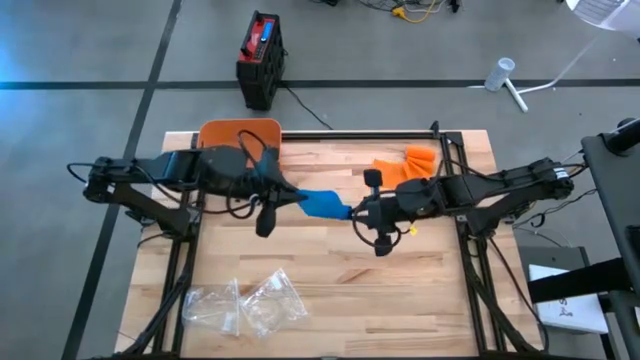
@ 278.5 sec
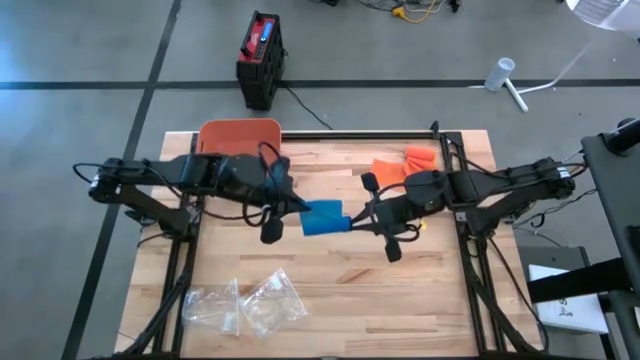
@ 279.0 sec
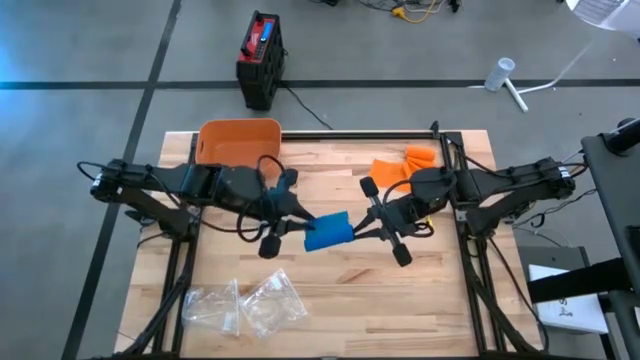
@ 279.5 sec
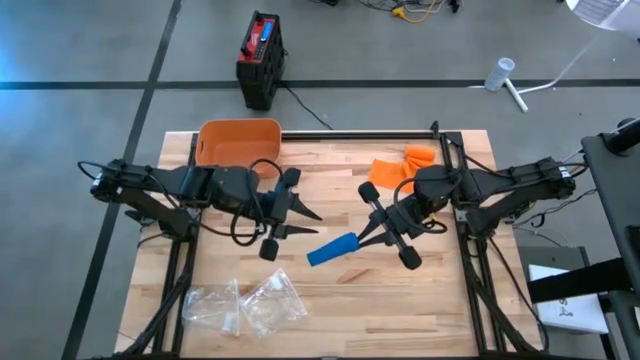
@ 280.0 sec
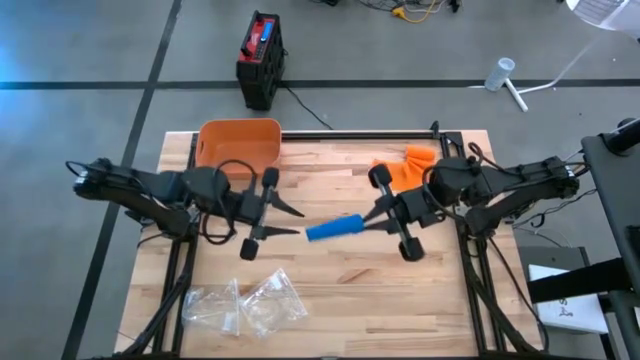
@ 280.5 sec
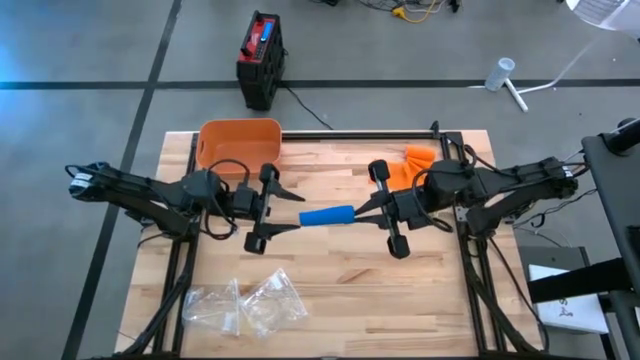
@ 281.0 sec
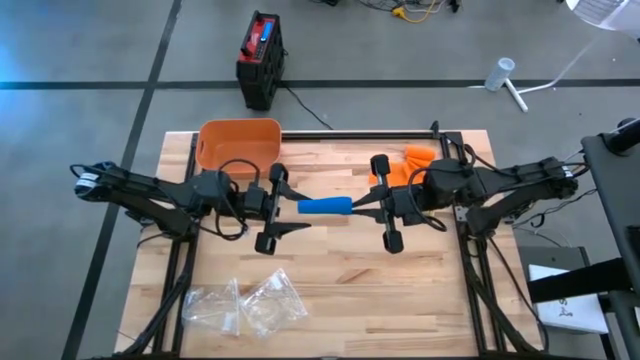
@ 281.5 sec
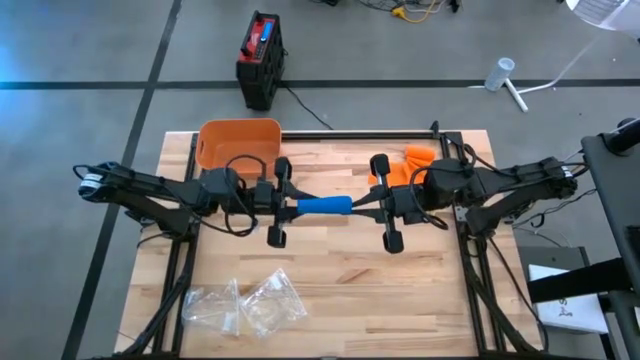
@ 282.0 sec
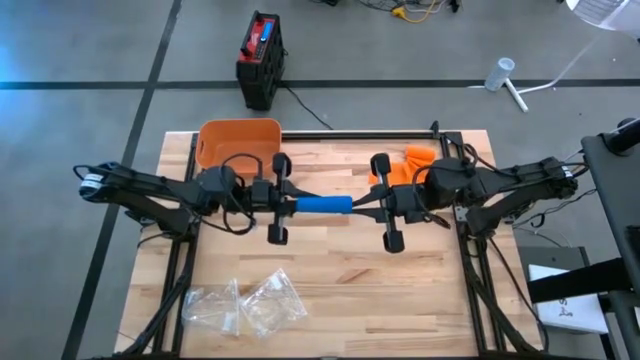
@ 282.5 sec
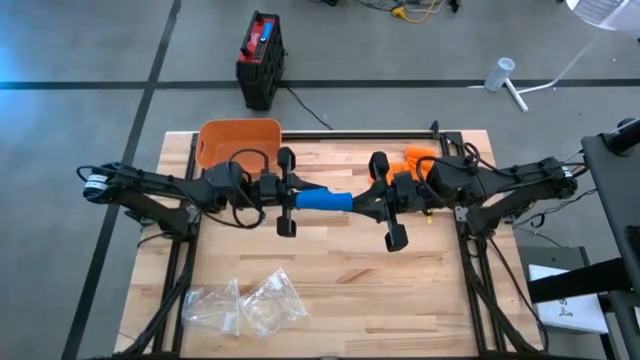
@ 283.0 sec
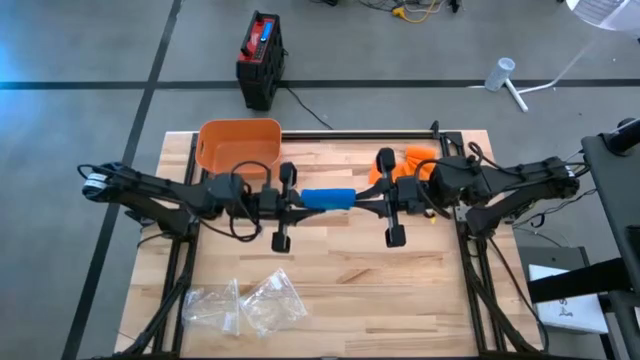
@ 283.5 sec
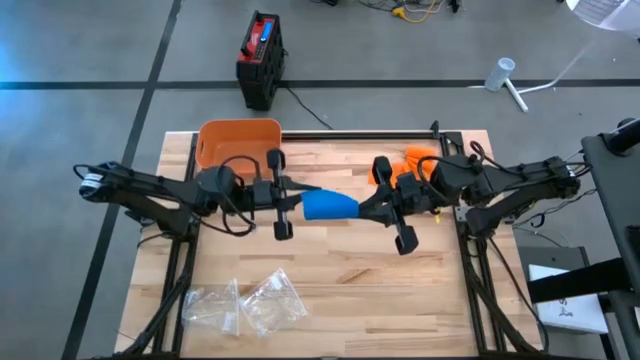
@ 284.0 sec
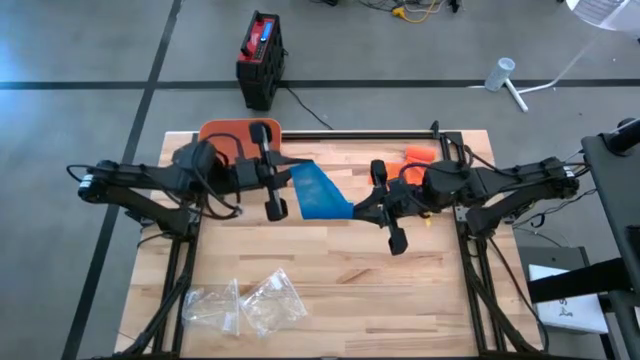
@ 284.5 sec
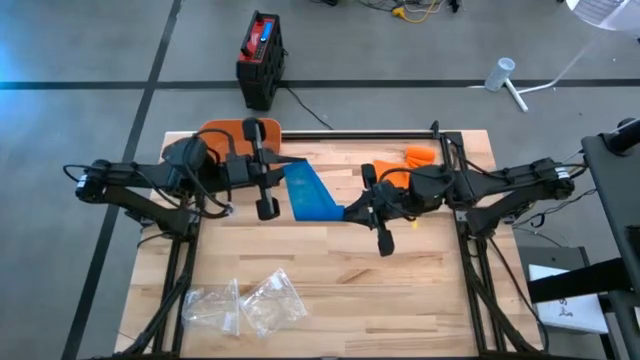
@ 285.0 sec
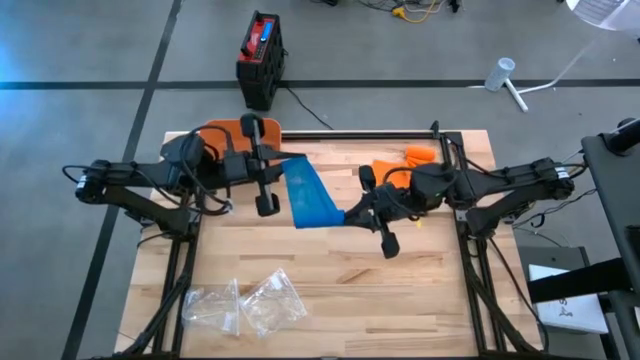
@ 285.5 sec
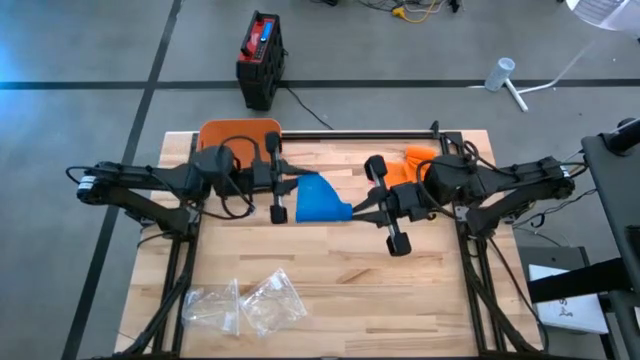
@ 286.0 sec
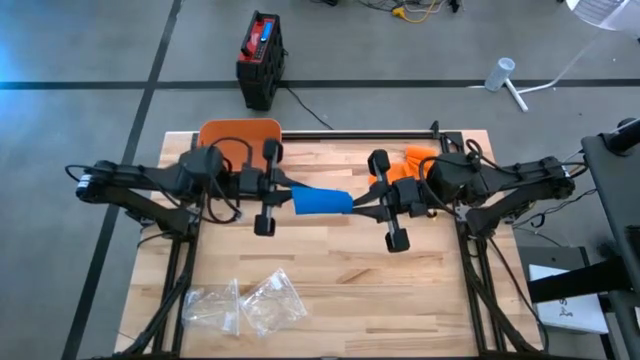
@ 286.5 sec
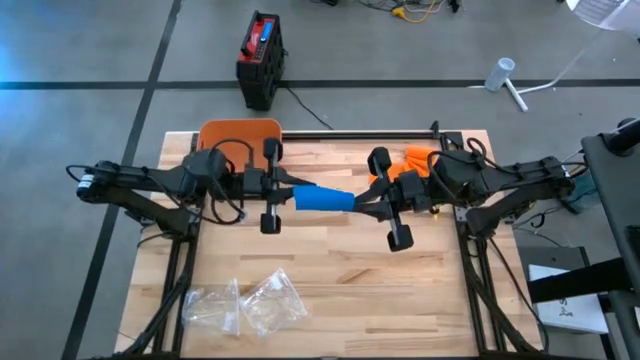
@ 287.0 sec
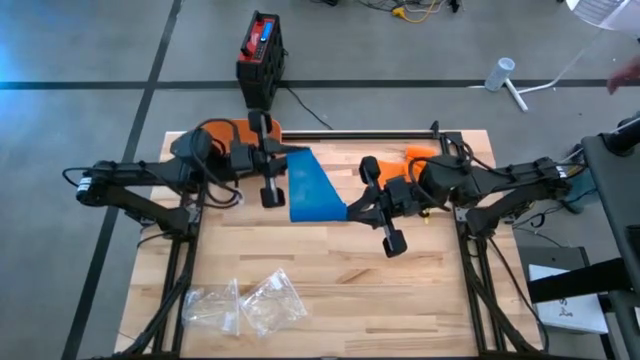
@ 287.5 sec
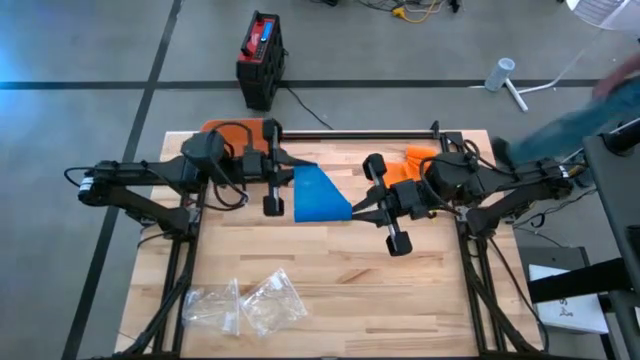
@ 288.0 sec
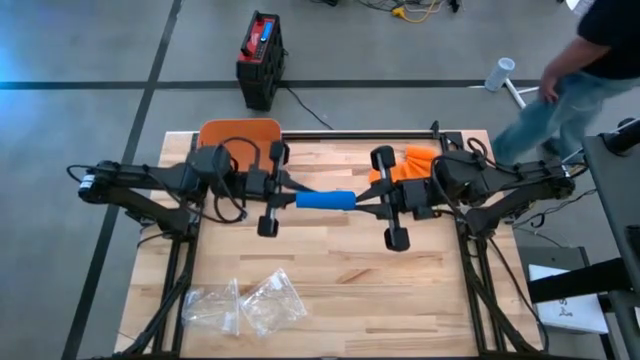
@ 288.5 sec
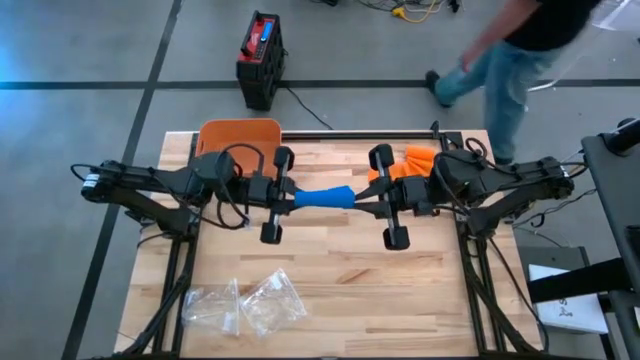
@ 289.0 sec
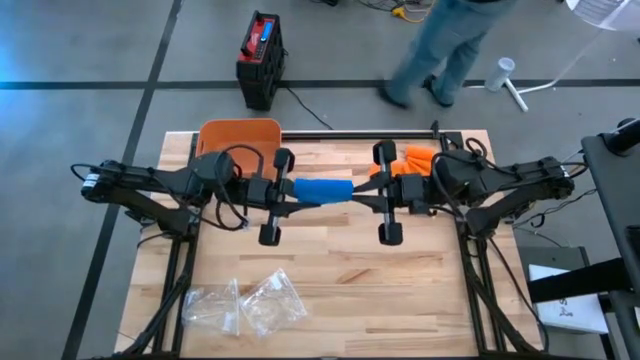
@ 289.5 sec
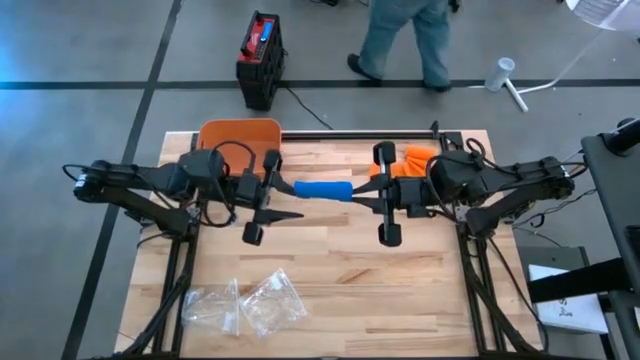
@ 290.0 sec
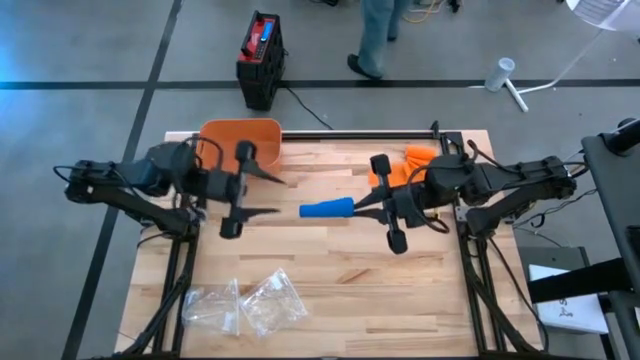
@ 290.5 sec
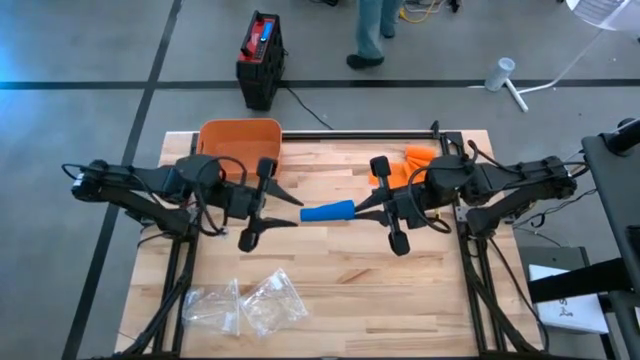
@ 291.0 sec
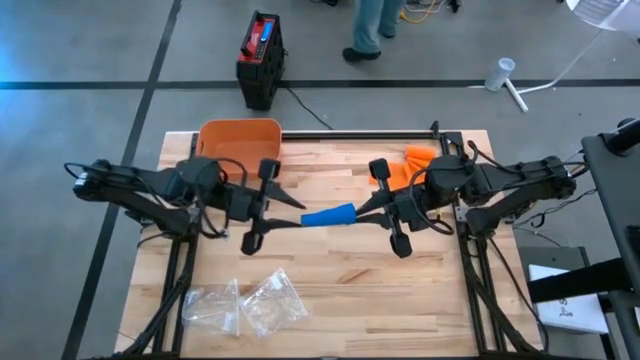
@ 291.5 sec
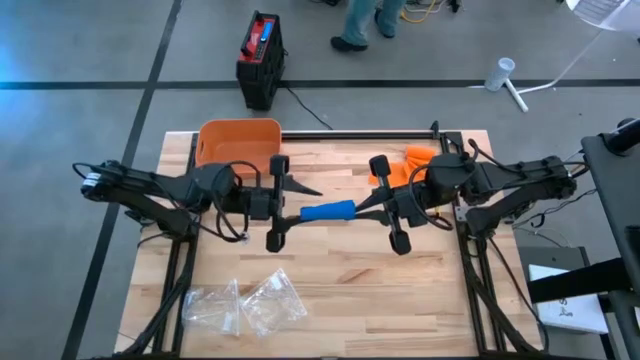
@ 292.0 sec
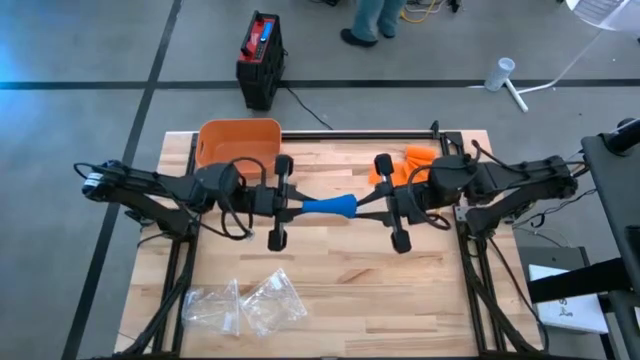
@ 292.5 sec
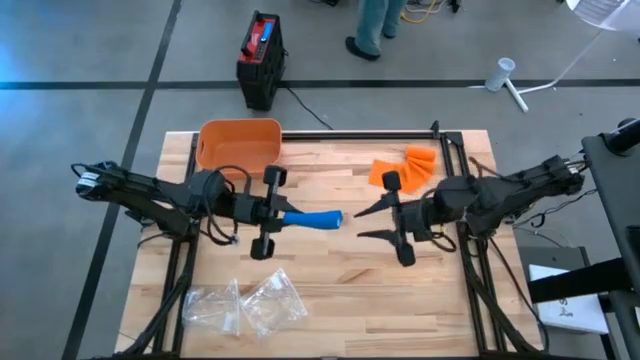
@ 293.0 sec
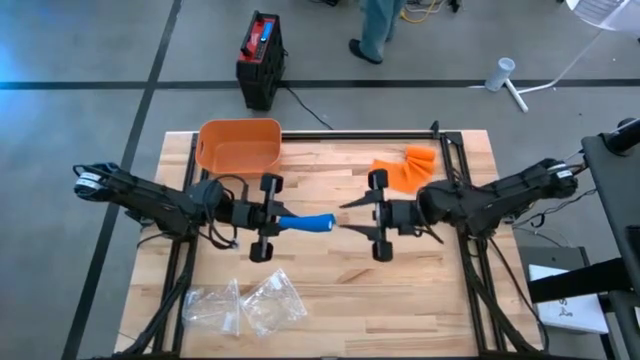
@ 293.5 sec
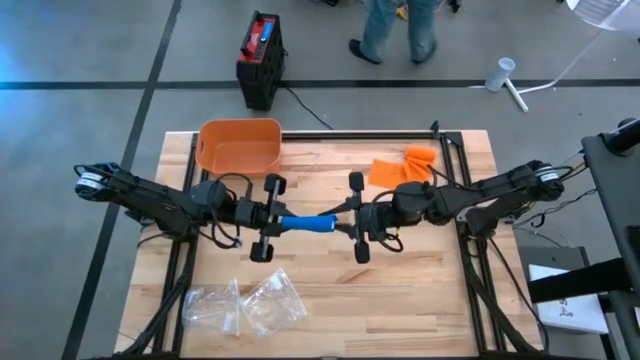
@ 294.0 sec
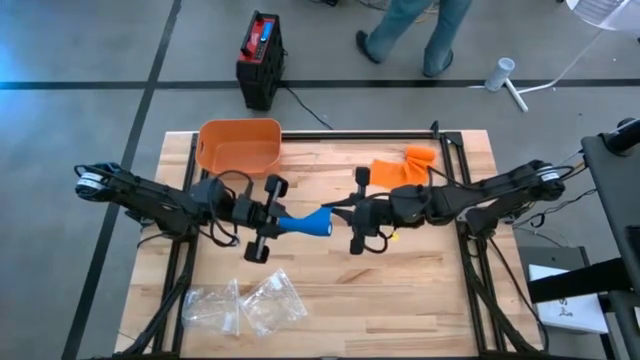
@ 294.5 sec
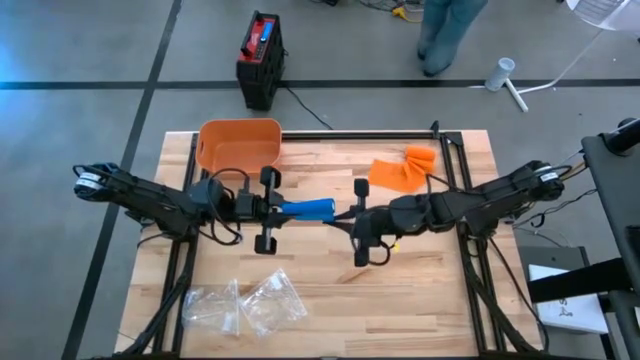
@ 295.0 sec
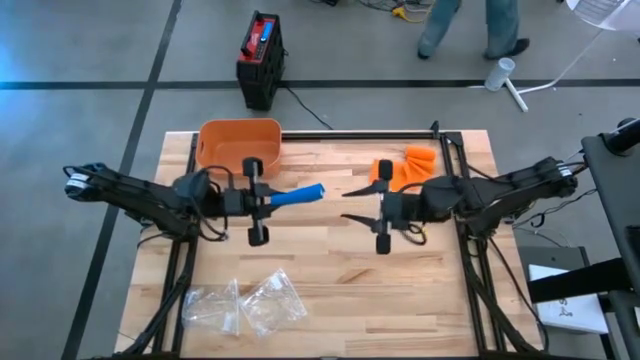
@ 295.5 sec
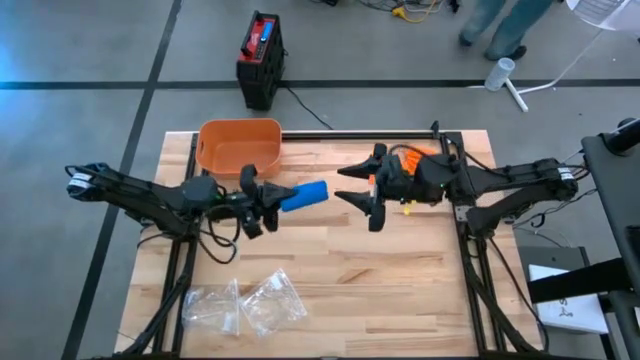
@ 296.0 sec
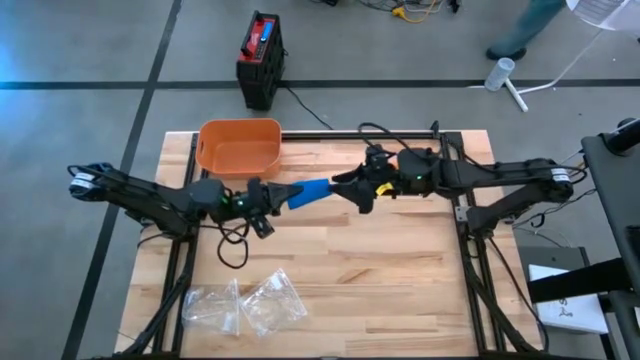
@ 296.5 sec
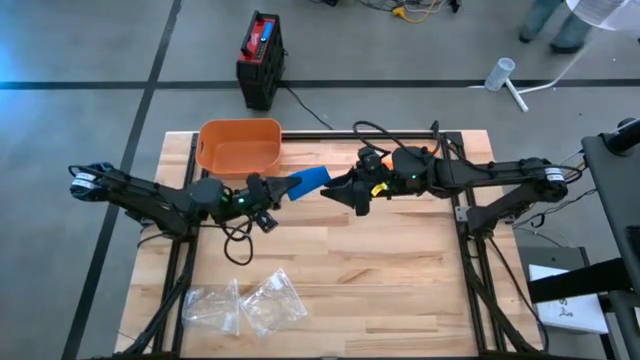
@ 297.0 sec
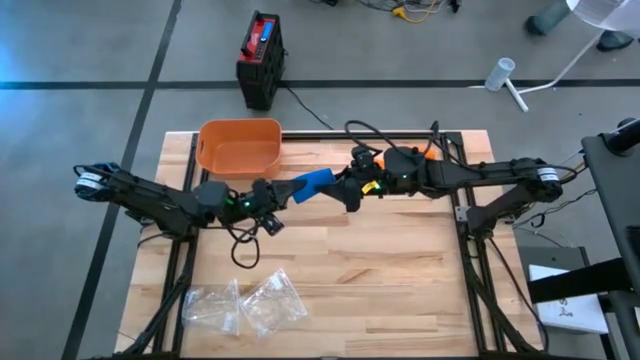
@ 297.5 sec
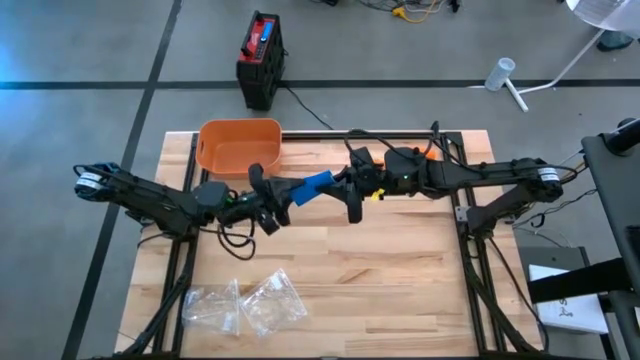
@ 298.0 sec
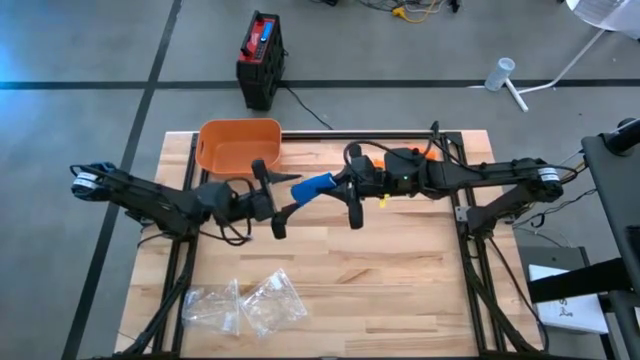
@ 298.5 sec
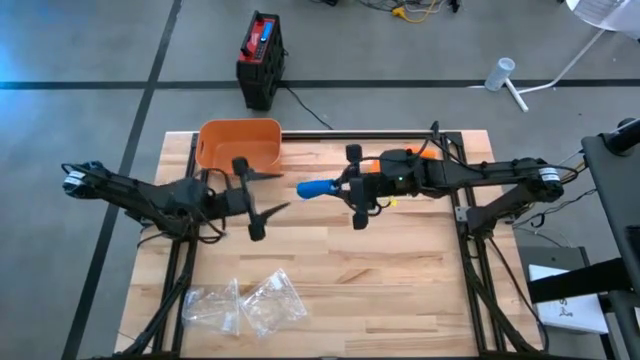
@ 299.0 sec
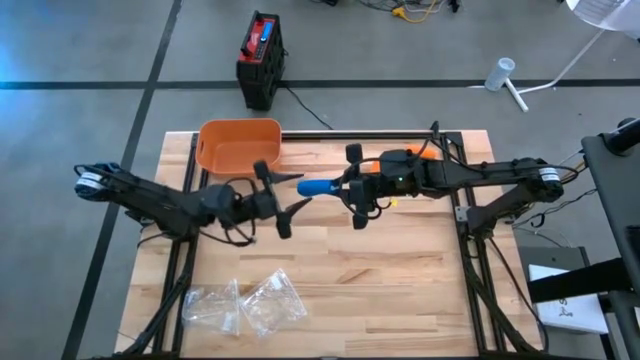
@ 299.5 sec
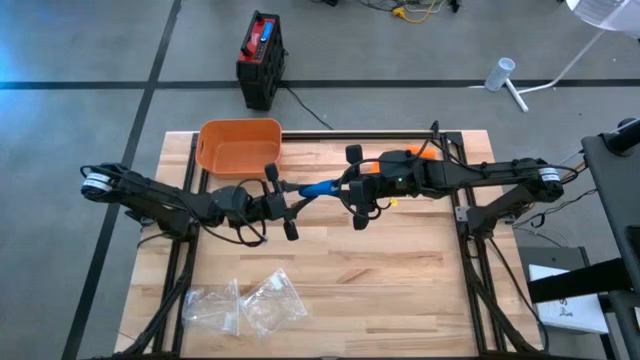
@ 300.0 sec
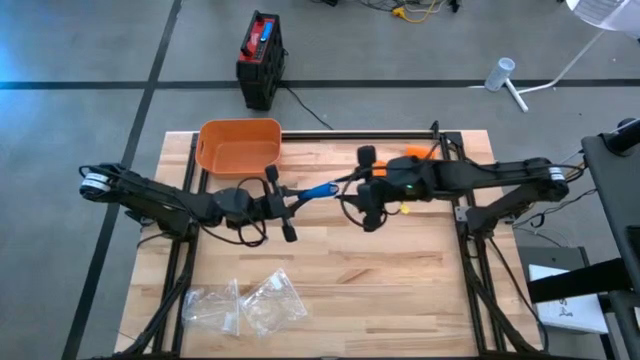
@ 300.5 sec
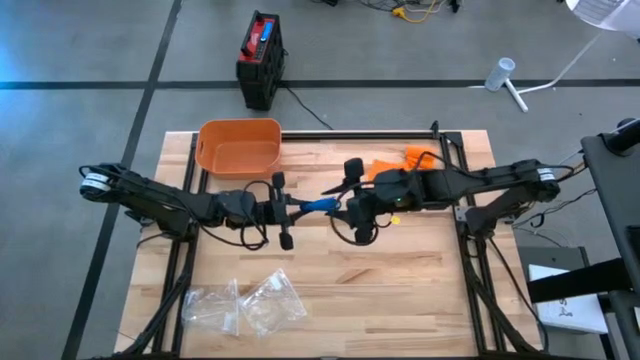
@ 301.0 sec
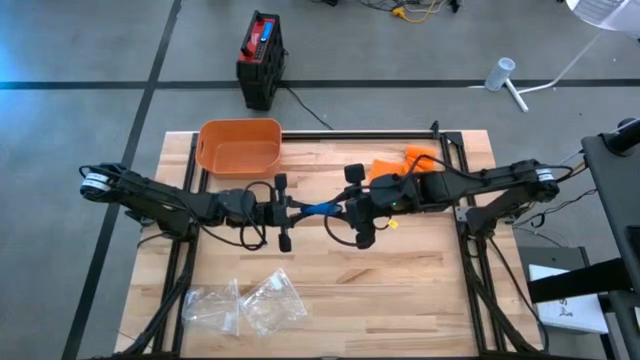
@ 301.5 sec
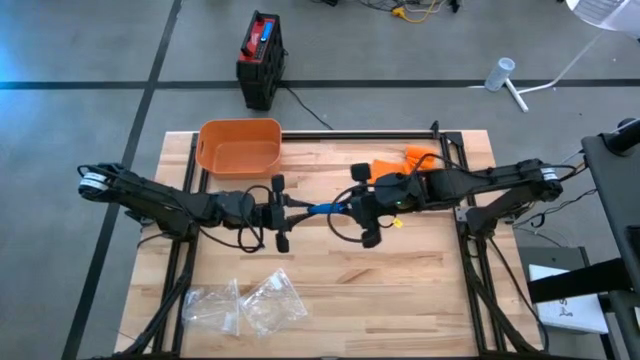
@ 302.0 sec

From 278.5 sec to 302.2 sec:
Task: Roll bandage
Roll the blue bandage
